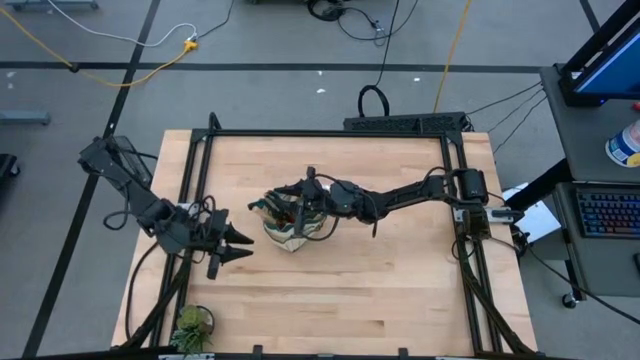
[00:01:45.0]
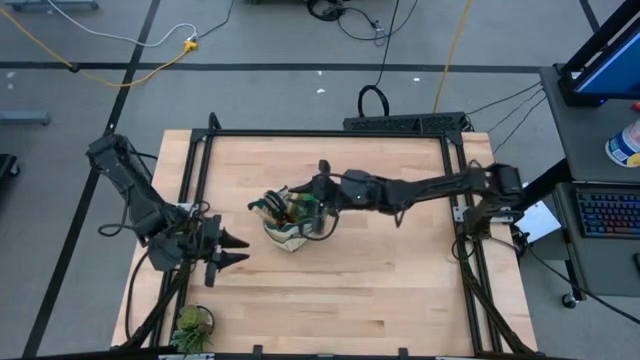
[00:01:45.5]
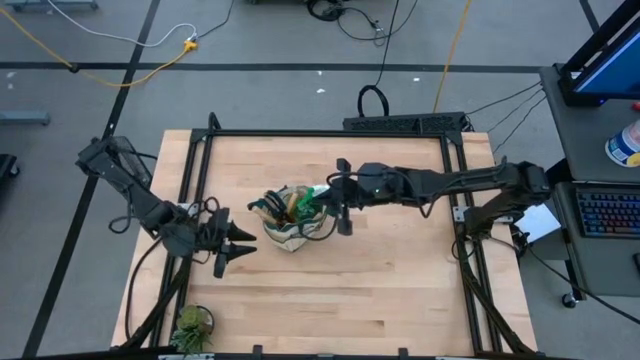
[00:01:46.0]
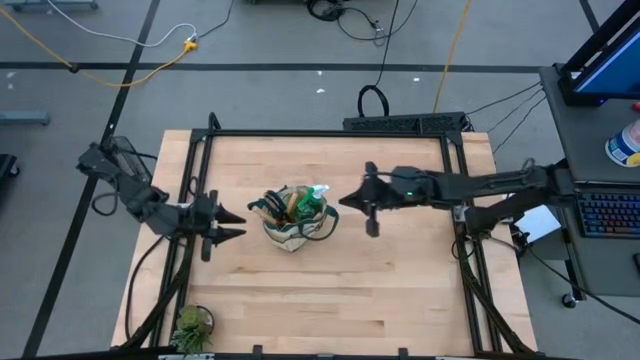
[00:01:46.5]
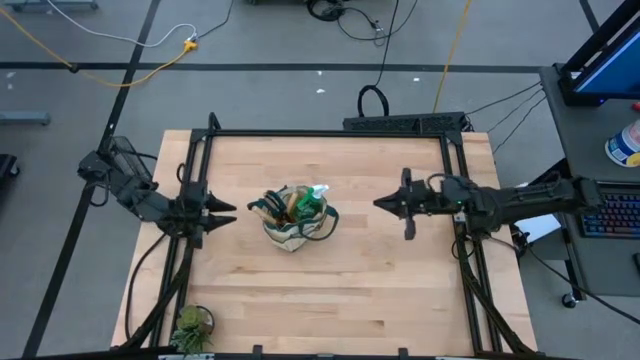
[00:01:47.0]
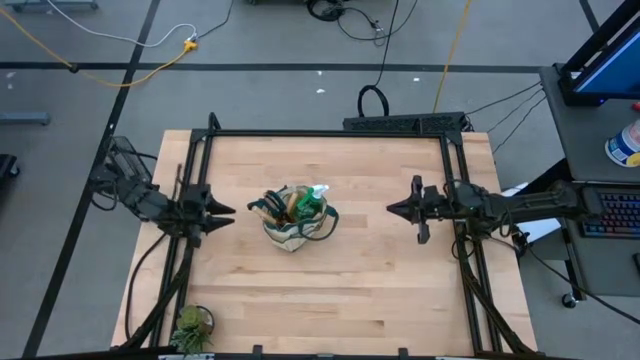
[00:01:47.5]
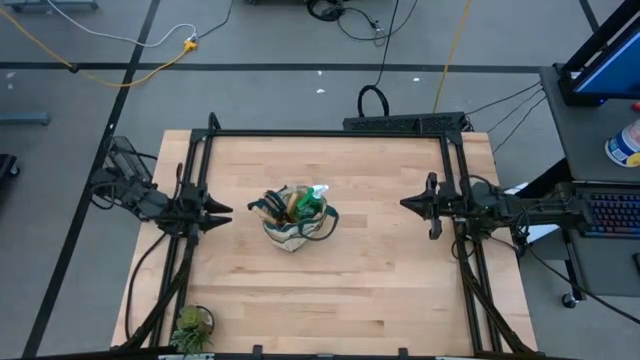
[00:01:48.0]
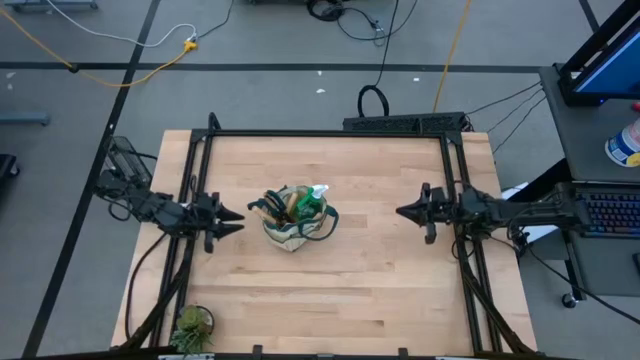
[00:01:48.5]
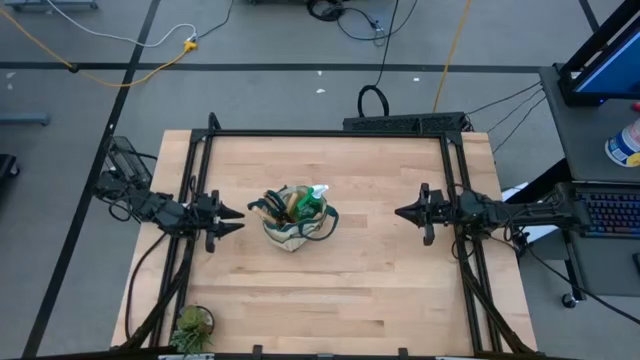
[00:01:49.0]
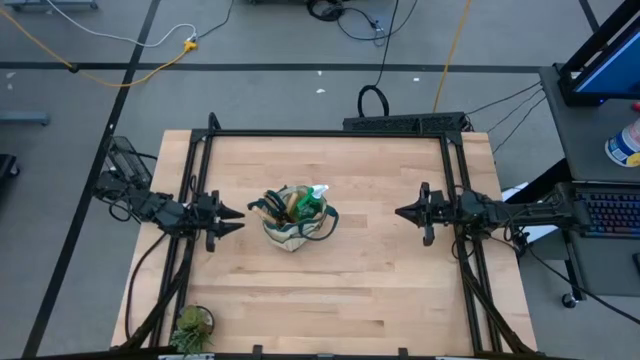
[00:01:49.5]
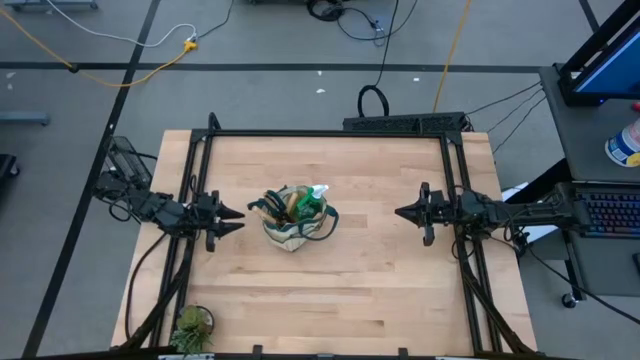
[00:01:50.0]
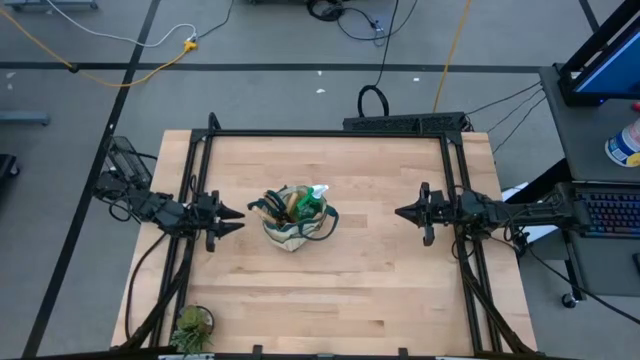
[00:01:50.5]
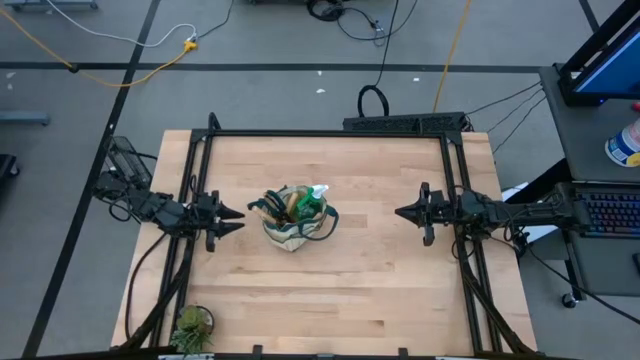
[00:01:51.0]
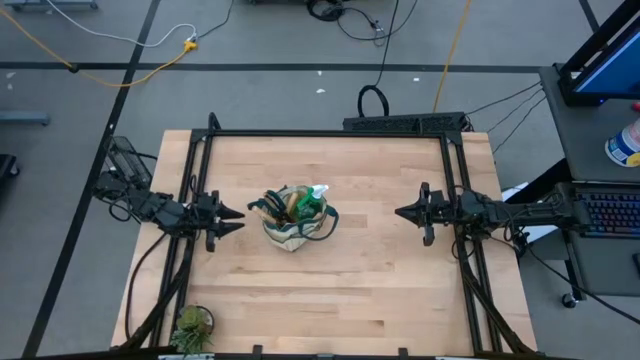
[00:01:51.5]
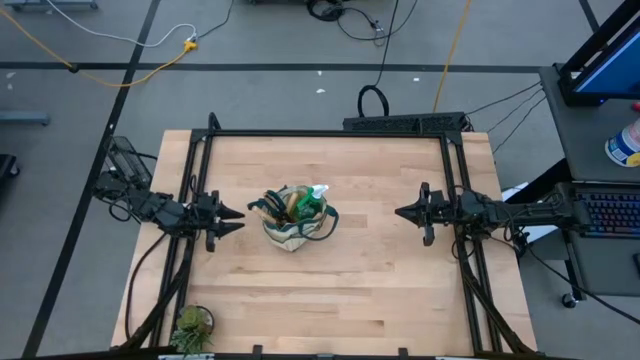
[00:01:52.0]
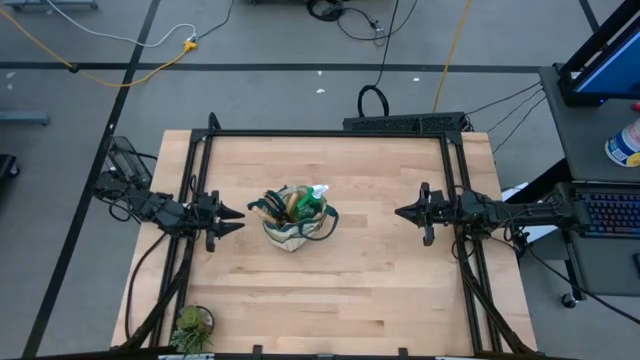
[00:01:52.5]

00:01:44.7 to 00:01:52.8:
Task: Pick & Place Garden tools in Gardening bag
Return to Home Position

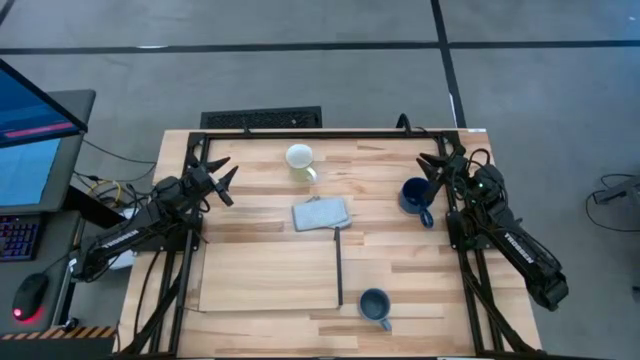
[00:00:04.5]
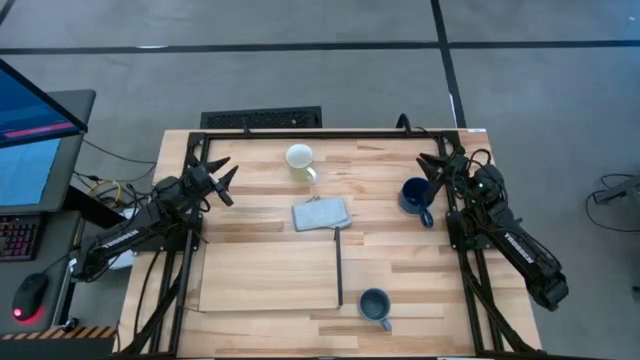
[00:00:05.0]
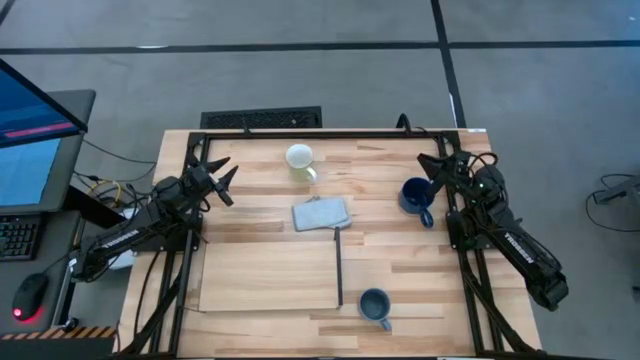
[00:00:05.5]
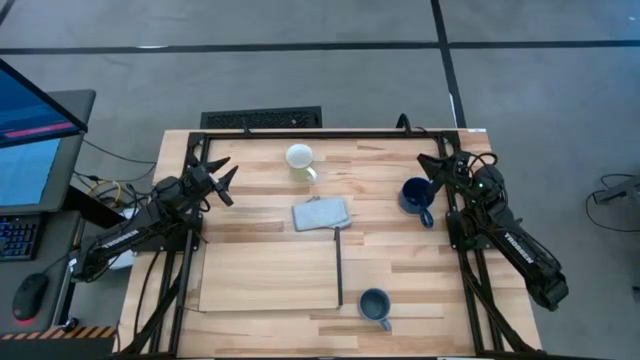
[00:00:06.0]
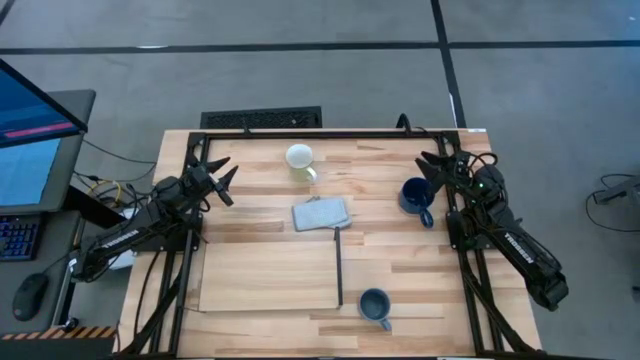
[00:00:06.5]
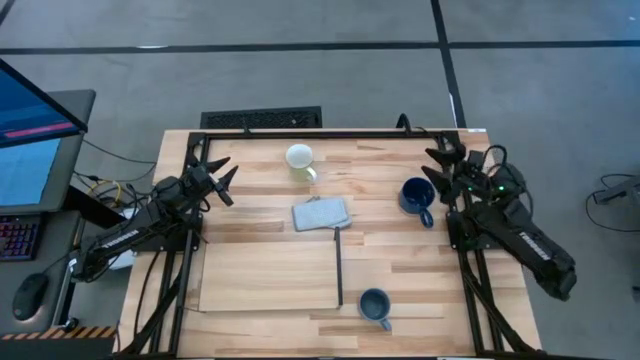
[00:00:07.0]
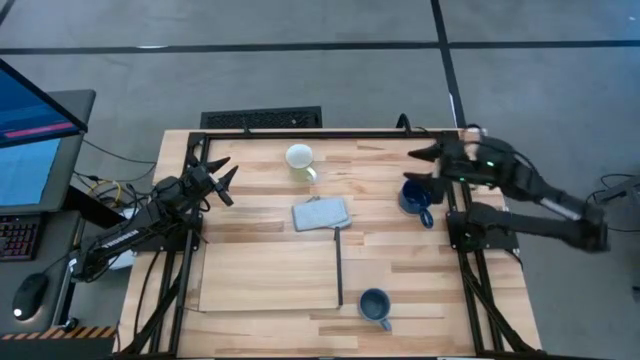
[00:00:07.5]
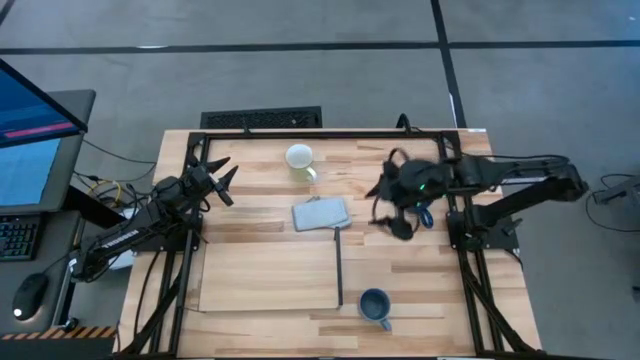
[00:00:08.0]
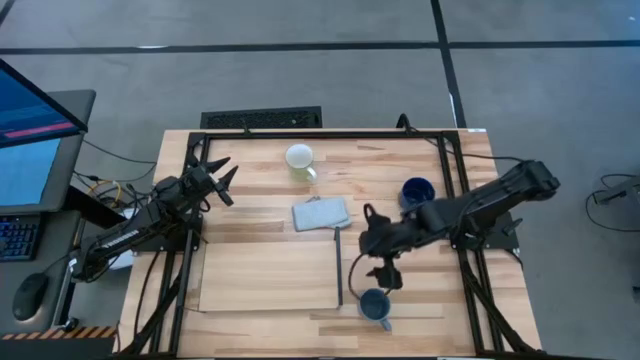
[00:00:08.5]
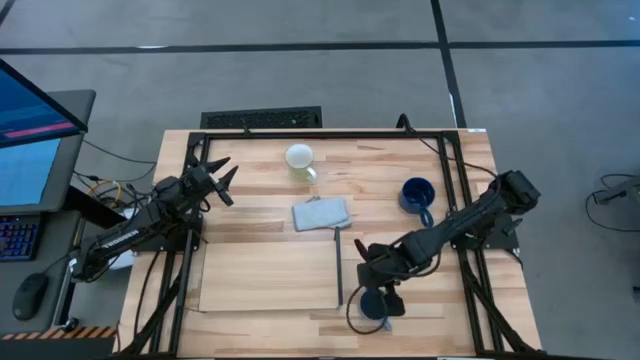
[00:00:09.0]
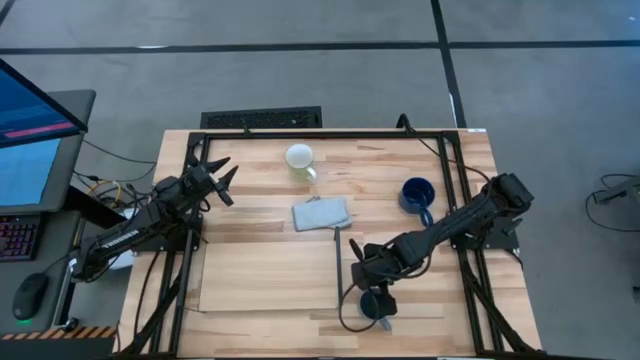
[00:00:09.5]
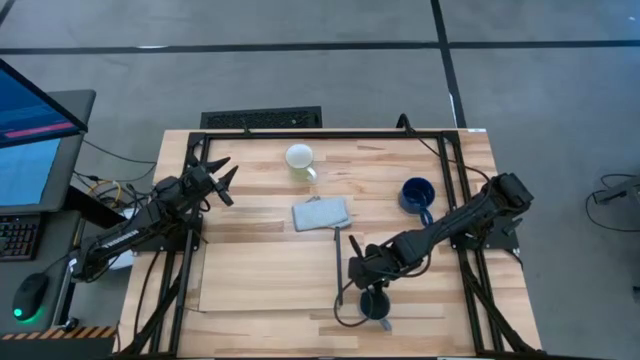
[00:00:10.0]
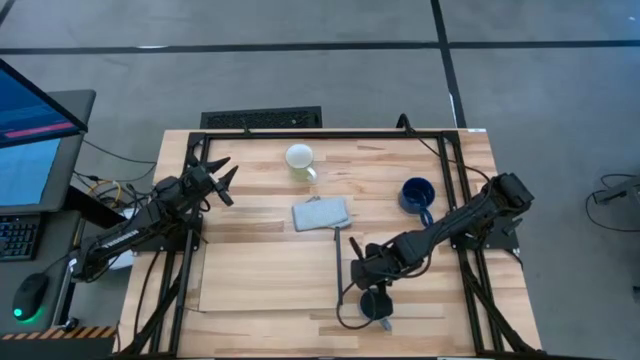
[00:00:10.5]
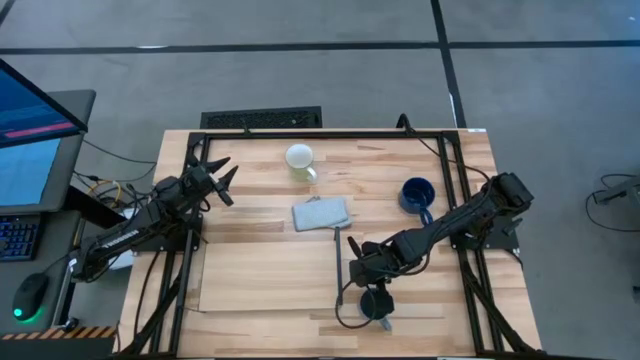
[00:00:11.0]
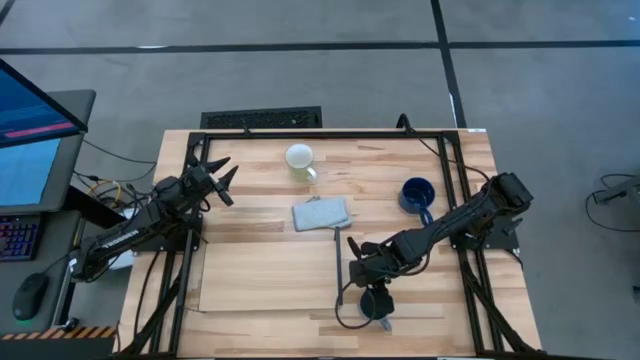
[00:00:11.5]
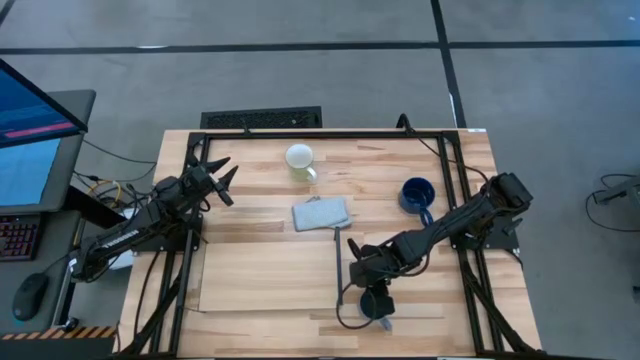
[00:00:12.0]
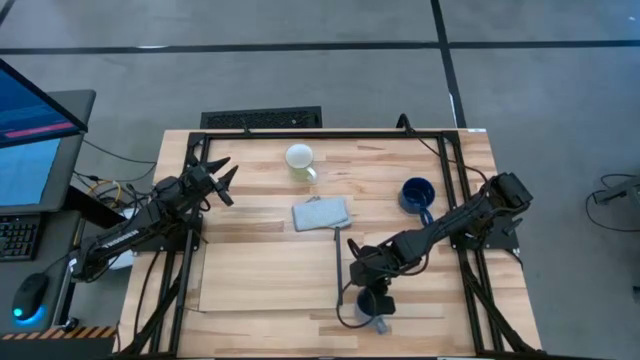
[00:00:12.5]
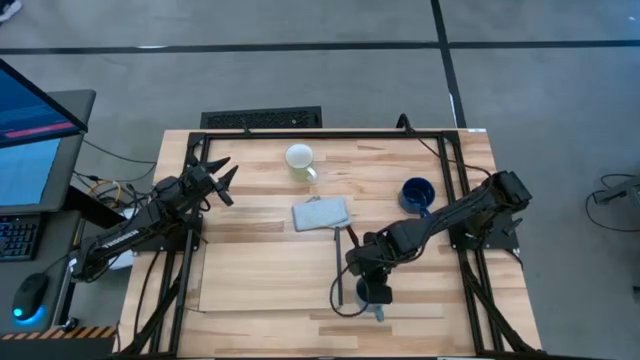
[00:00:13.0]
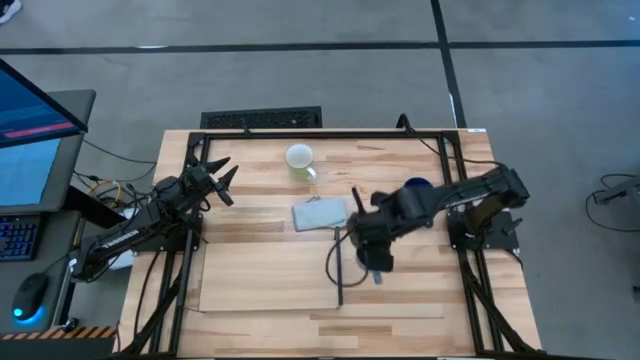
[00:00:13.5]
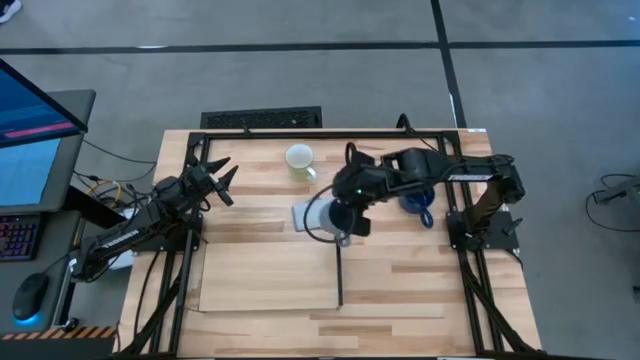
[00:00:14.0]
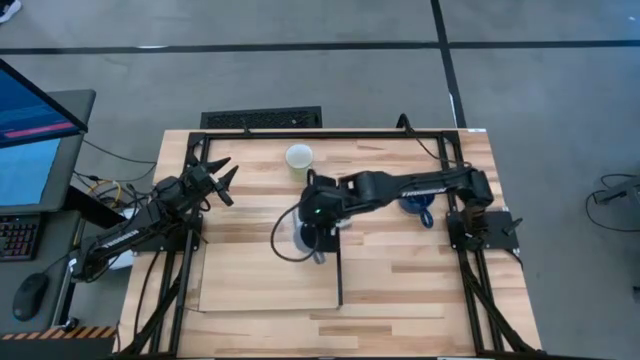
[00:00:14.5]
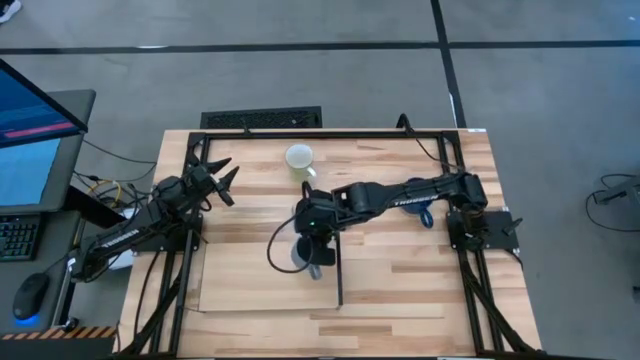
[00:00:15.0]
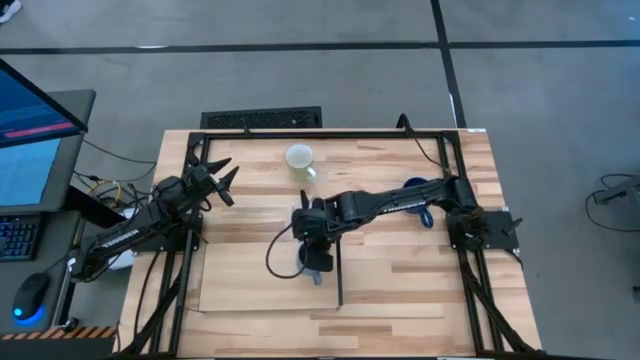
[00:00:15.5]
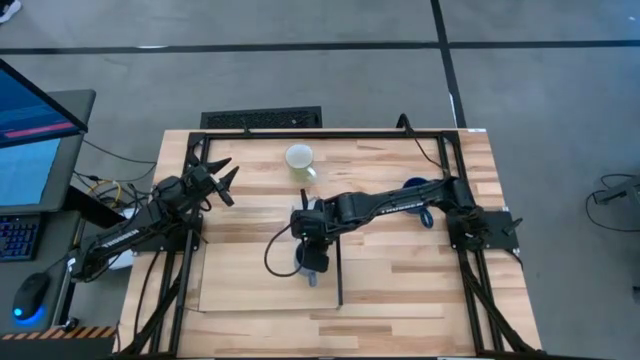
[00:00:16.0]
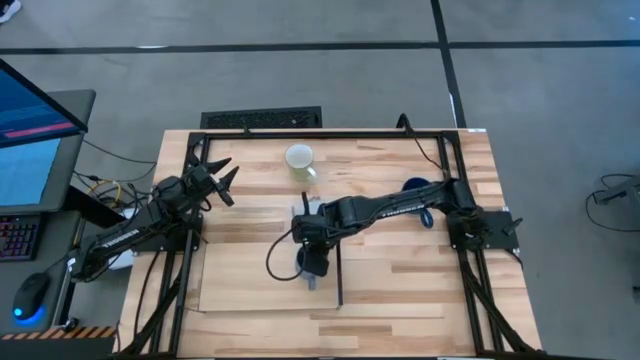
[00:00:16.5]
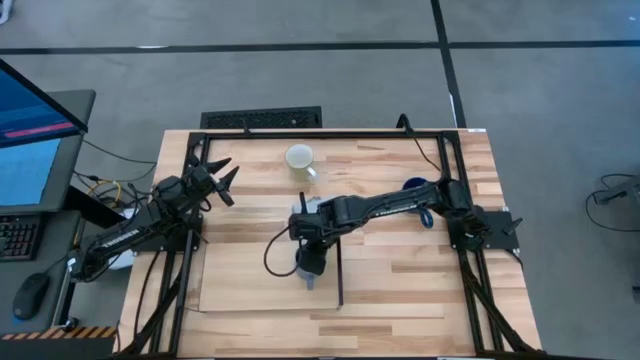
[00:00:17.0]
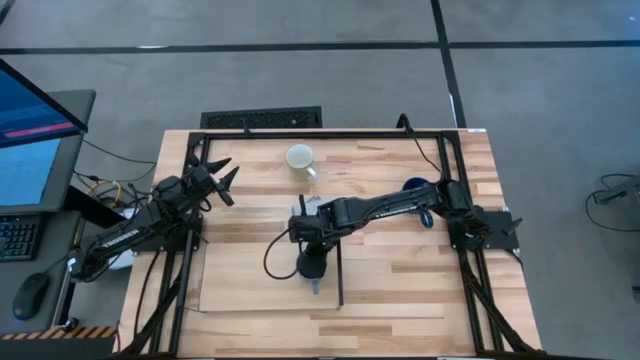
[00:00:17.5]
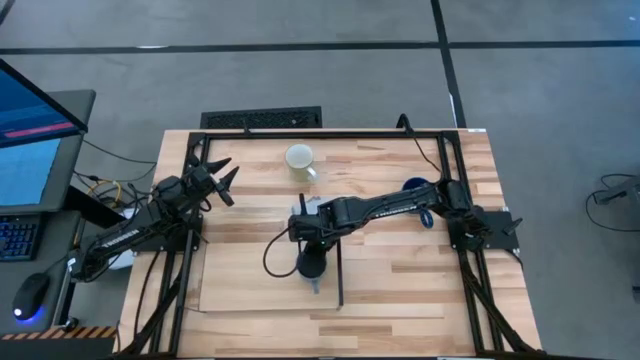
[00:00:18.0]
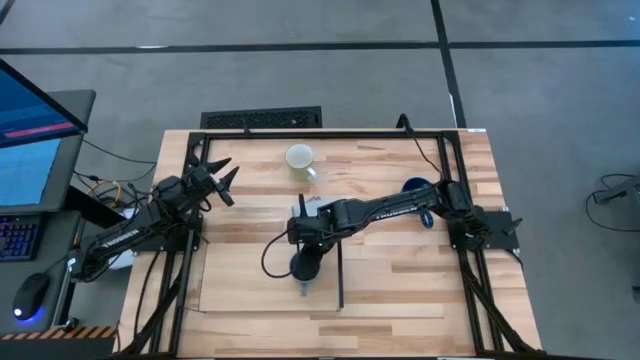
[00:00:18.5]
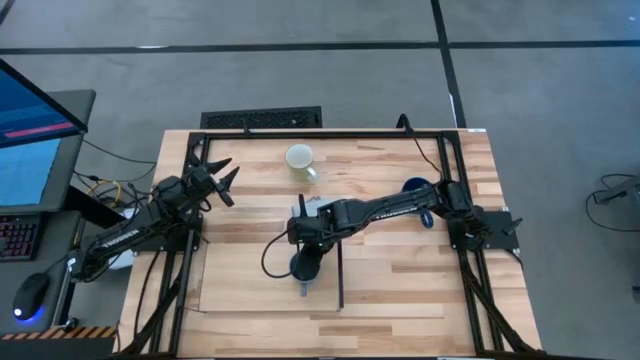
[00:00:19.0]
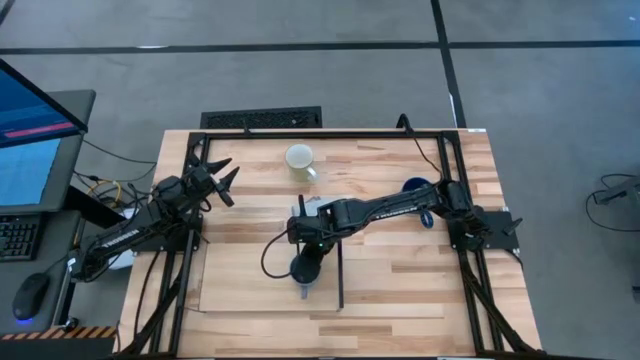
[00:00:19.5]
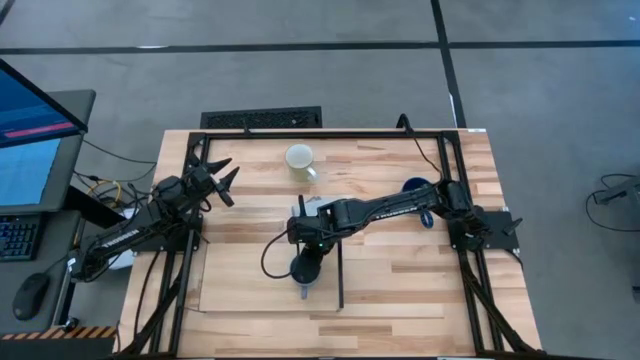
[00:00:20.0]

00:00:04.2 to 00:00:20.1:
Task: Stack small to large cups/mugs on shelf
Put the light blue mug on the shelf
